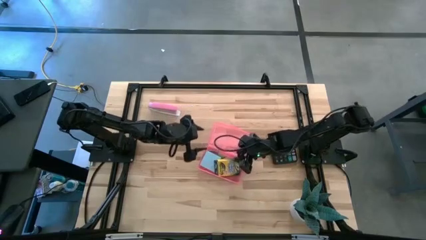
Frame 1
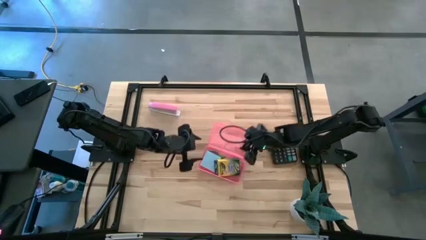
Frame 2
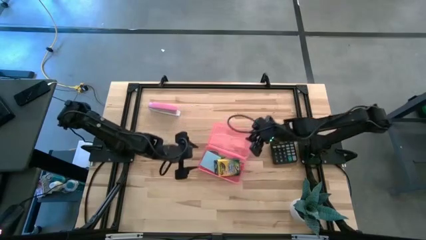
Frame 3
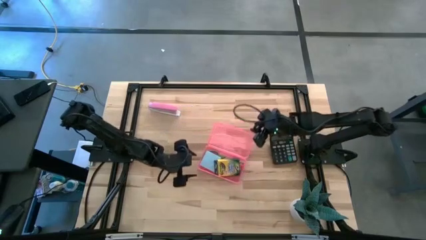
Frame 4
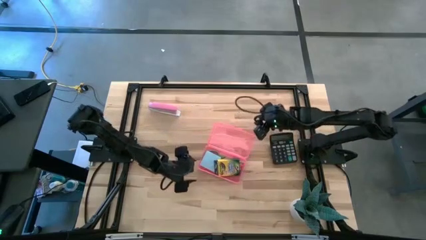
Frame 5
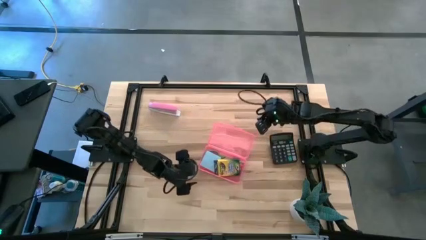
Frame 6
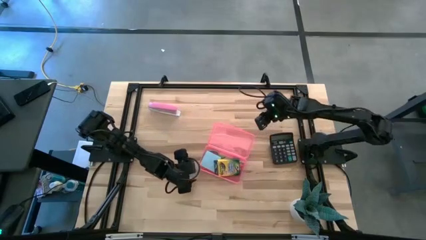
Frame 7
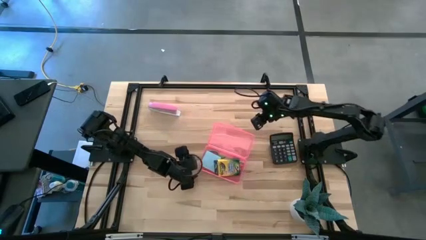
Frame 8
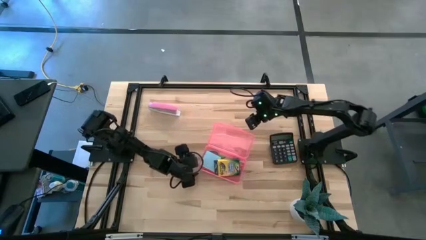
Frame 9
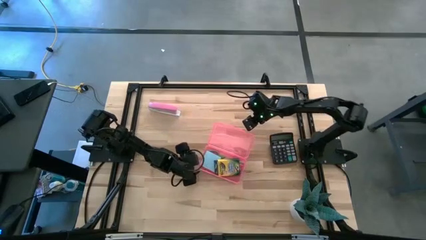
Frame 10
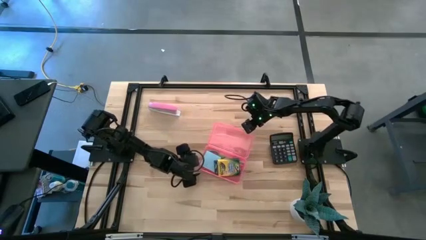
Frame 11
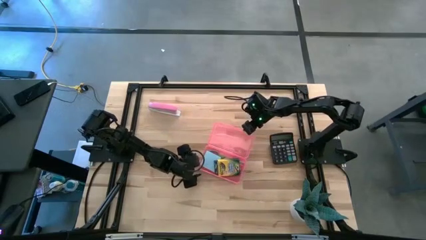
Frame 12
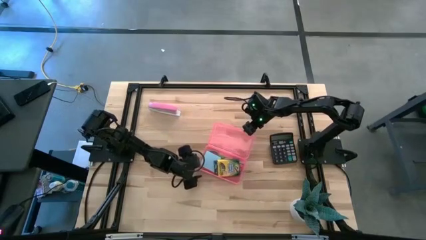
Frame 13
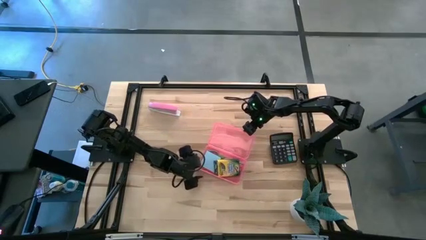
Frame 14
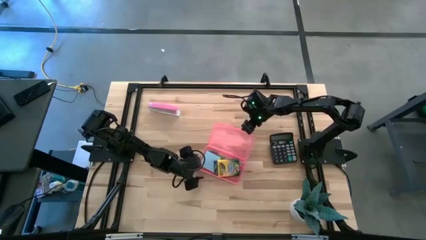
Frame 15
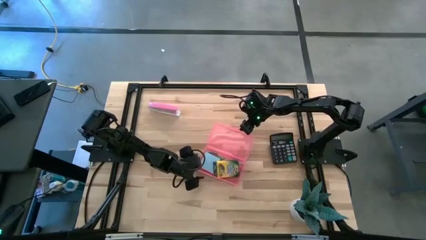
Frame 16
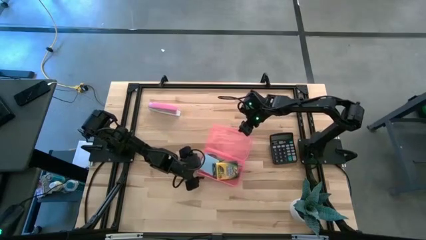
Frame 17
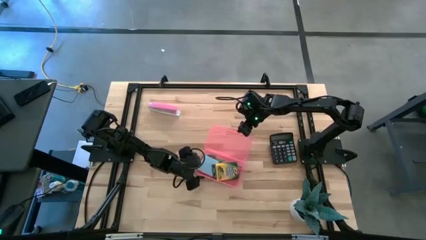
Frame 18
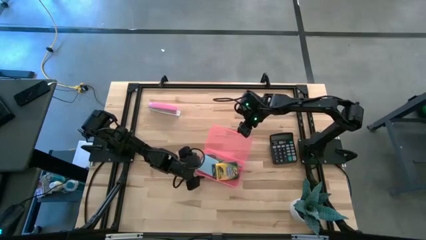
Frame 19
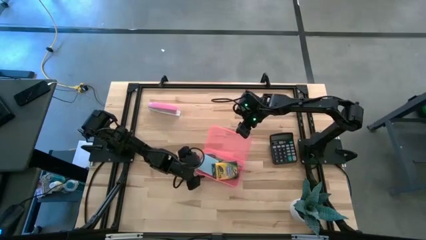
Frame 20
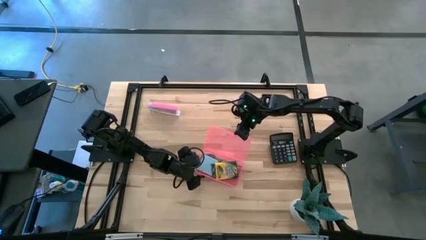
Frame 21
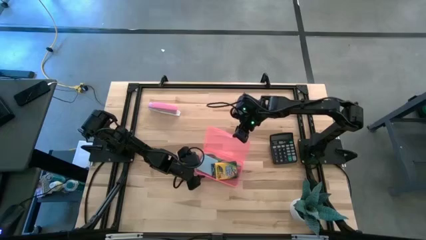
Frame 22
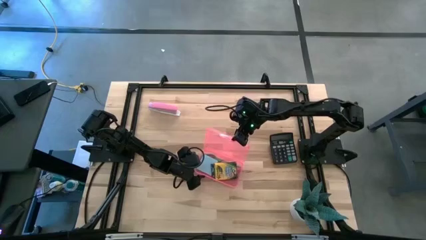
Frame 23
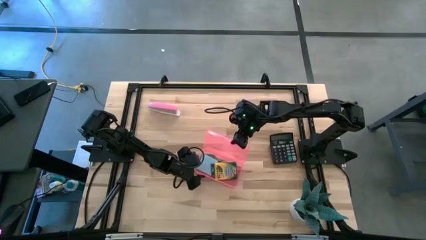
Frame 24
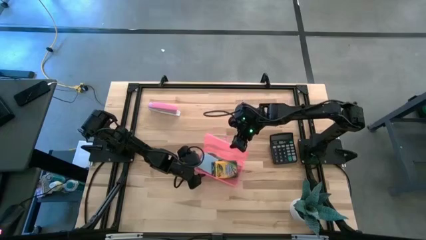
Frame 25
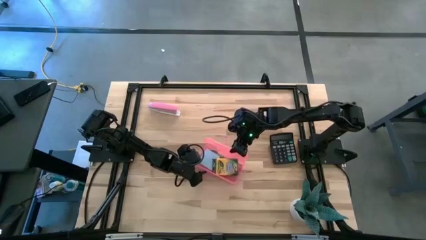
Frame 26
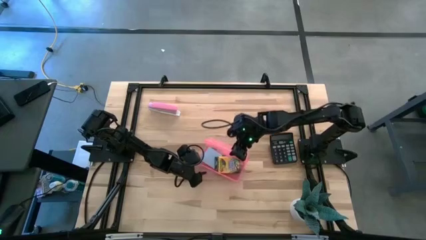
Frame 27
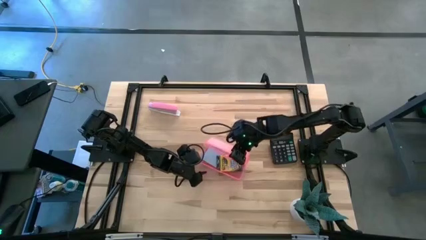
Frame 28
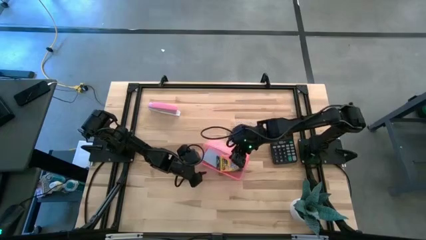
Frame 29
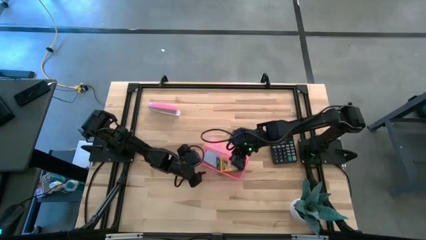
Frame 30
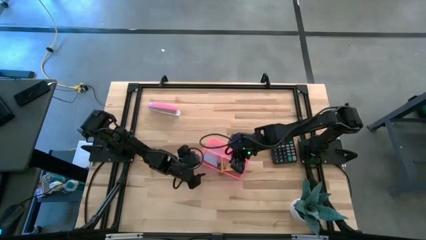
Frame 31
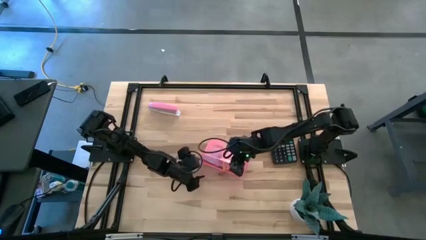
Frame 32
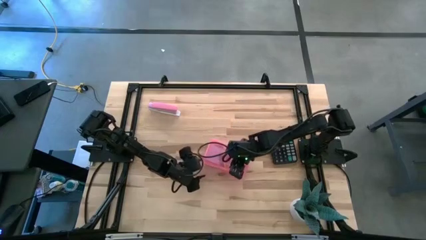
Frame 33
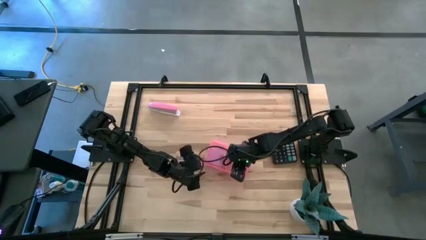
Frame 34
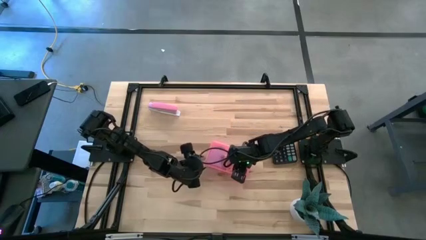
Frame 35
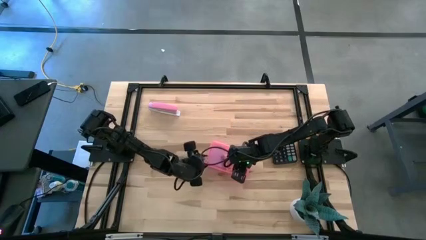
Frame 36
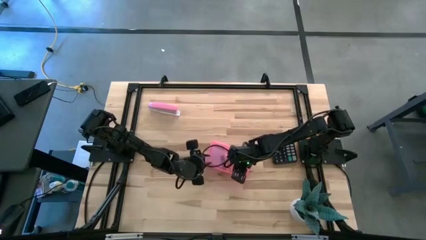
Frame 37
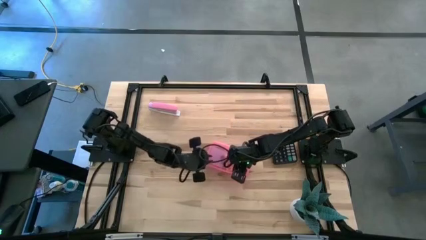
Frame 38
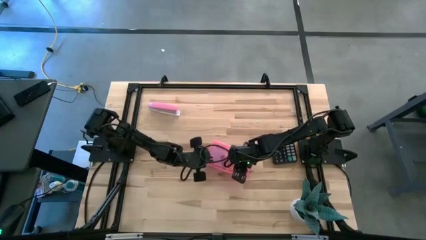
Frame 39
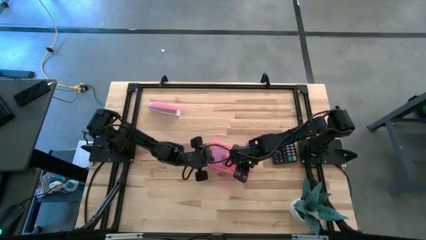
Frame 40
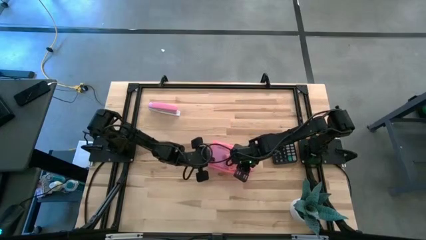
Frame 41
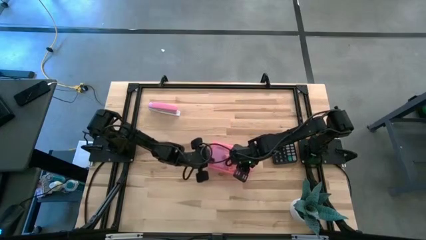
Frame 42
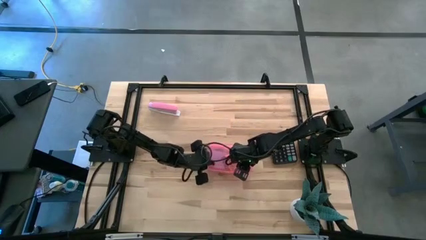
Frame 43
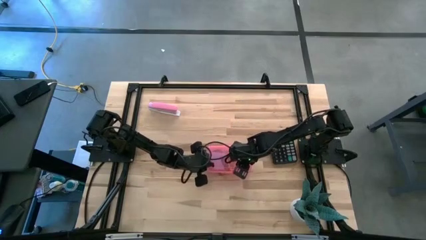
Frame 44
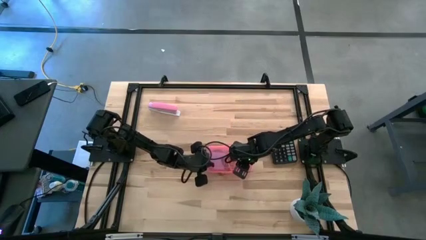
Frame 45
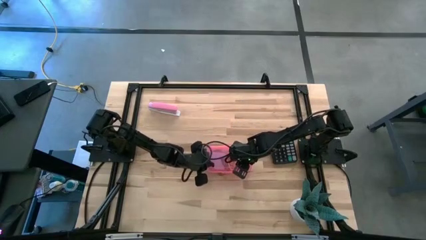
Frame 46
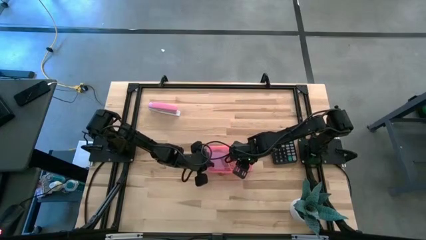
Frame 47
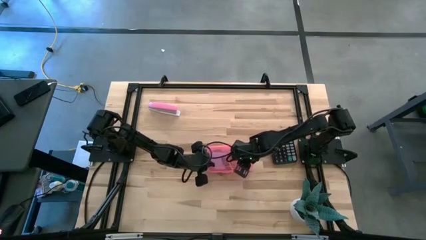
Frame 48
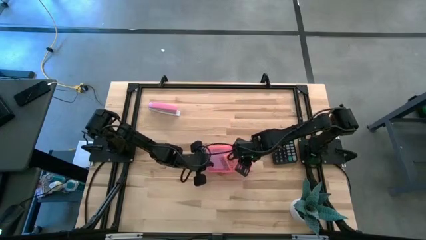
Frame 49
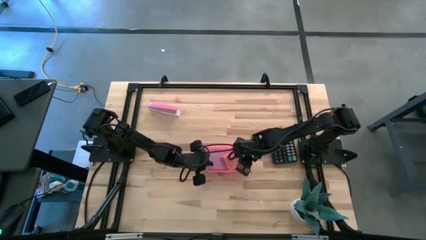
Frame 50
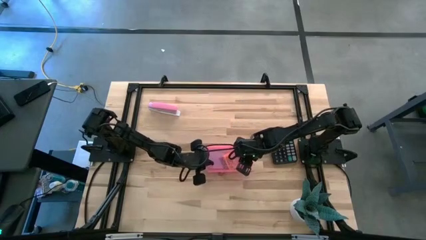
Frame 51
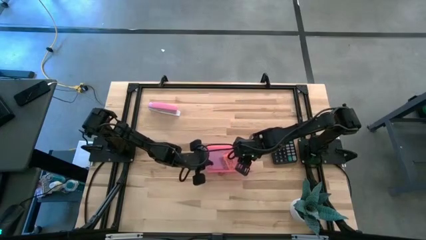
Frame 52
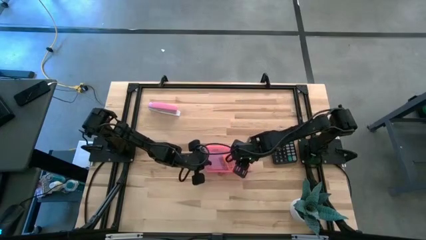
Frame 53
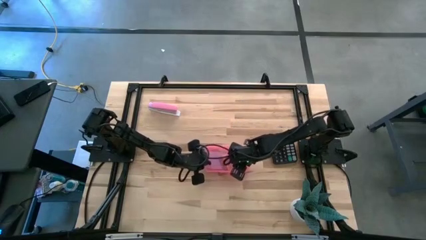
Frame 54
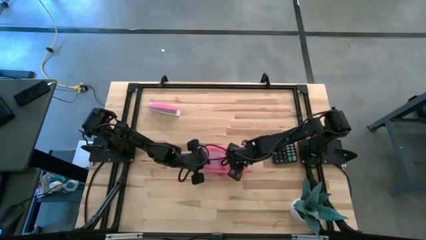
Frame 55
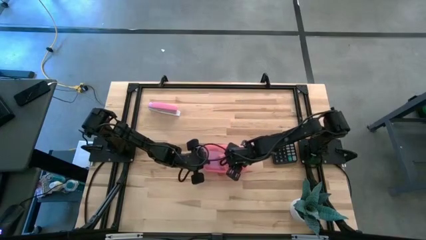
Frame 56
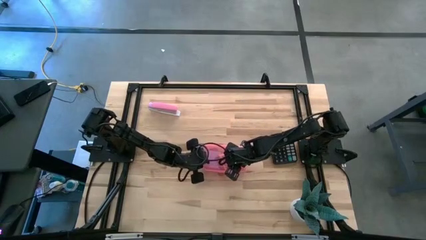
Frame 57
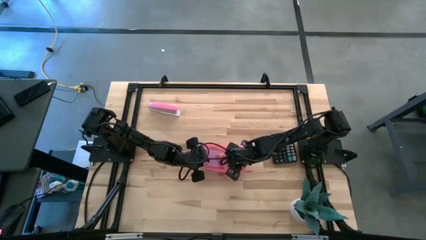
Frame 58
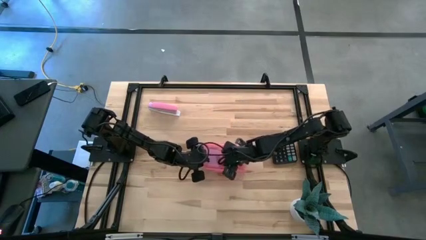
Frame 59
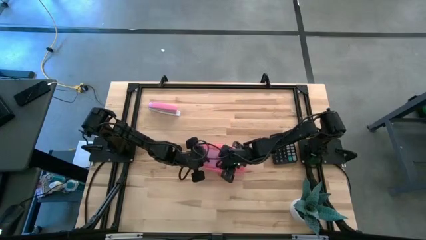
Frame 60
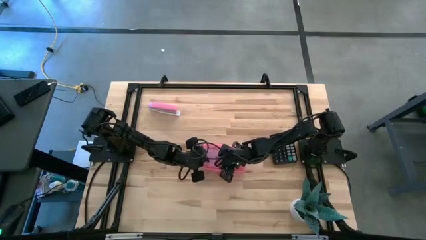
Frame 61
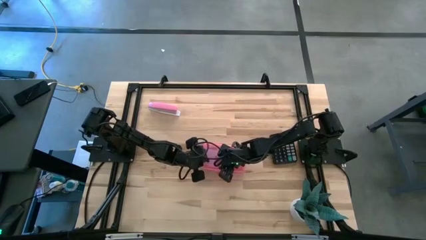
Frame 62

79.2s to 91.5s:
Task: Pack school essentials
Close the supply box

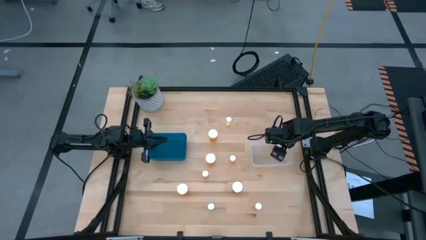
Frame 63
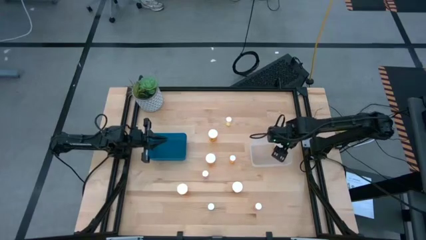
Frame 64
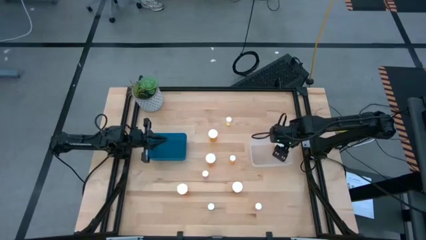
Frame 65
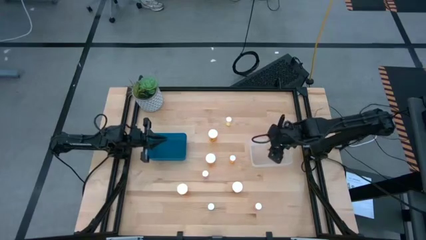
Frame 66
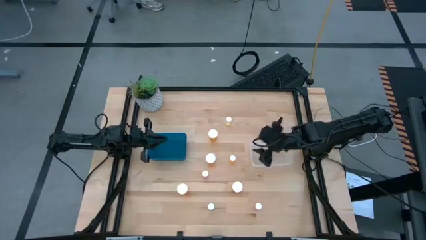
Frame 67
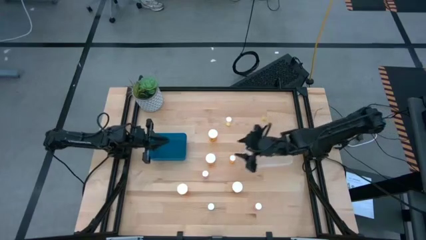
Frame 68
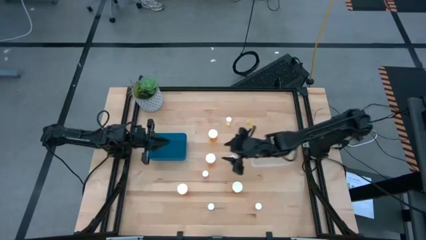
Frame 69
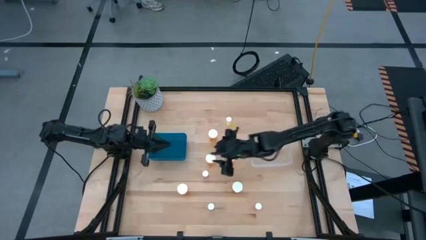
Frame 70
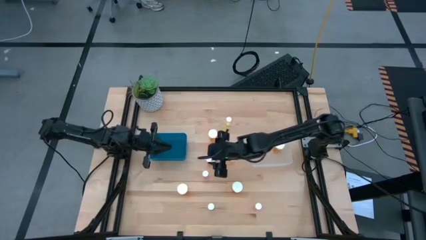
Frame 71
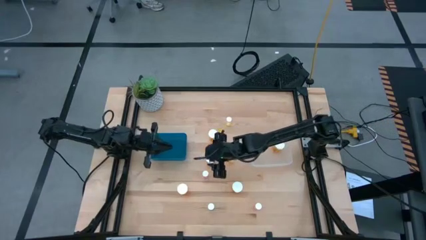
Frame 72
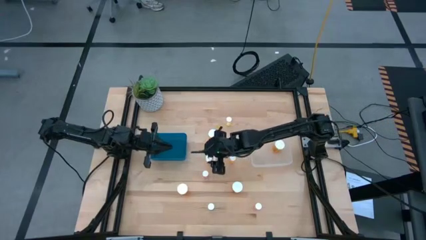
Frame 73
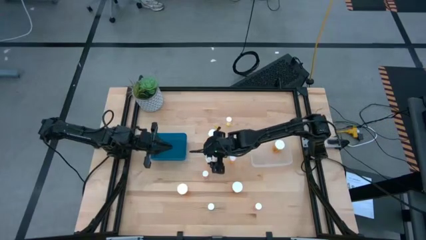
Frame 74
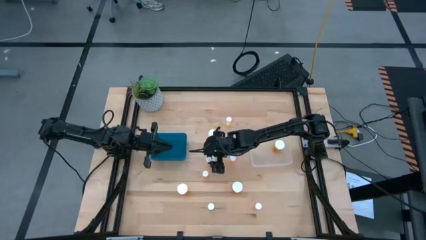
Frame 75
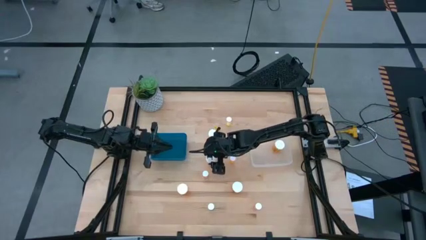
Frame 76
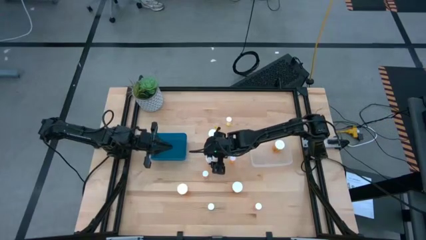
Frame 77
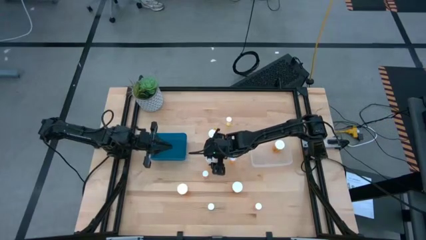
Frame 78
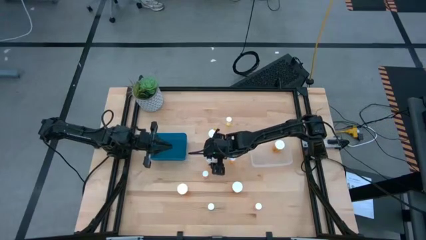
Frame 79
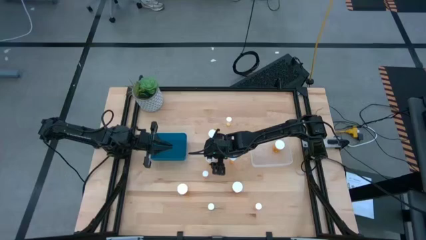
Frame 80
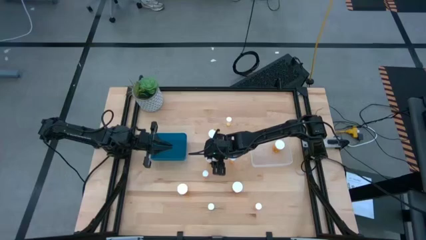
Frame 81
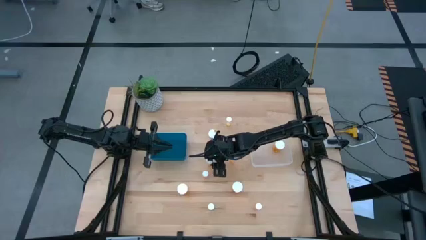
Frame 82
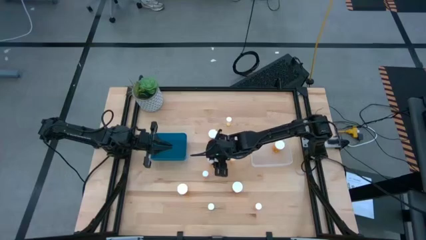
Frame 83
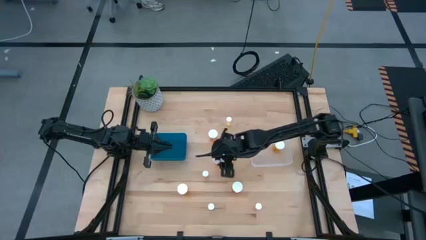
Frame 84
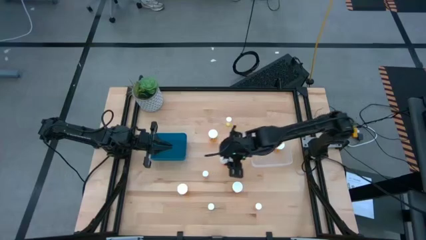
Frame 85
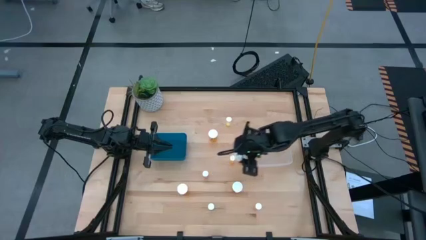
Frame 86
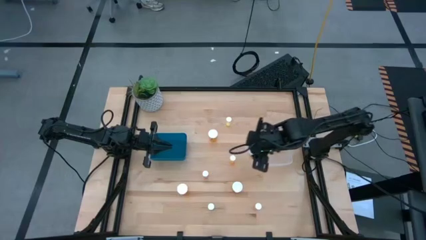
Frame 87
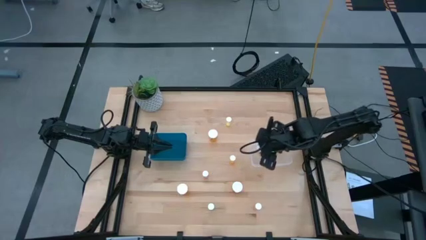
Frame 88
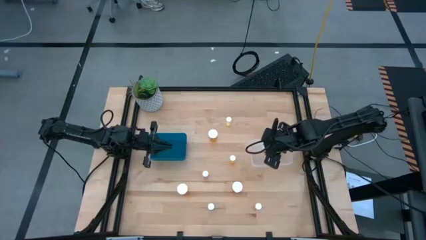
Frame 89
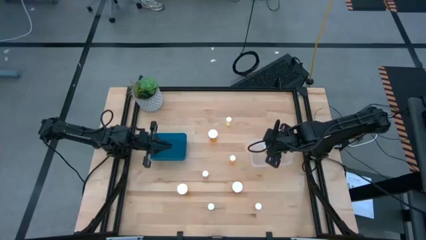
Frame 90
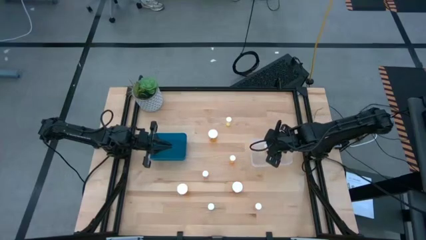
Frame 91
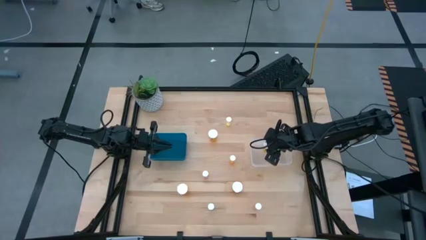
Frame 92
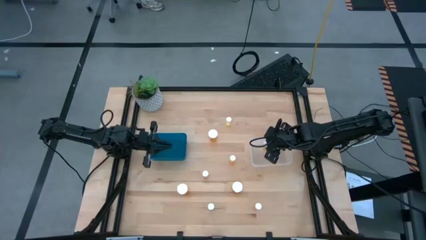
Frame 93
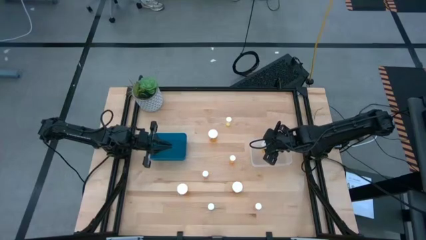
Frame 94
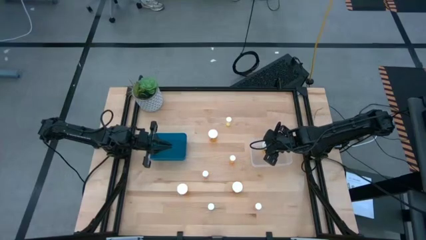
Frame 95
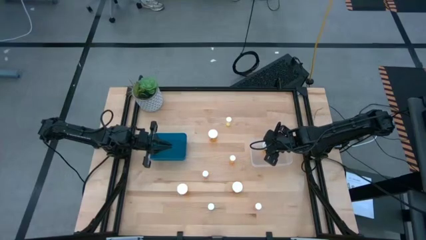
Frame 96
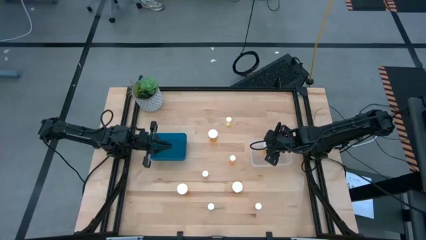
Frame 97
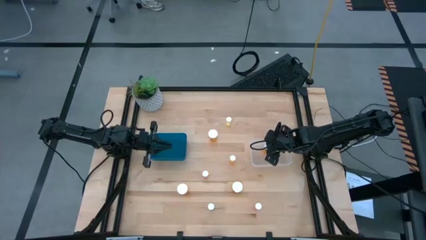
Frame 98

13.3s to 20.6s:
Task: Pick and place medicine bottles into bin by pill shape (circle, oval)
Put the large orange pill bottle into the transparent bin
